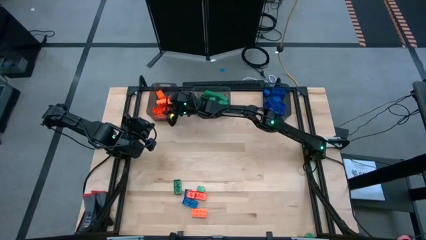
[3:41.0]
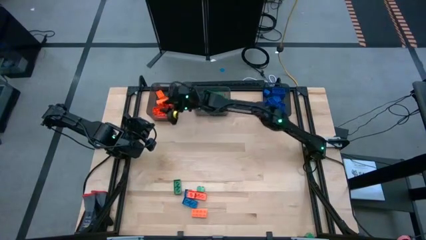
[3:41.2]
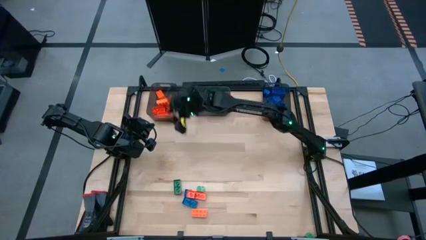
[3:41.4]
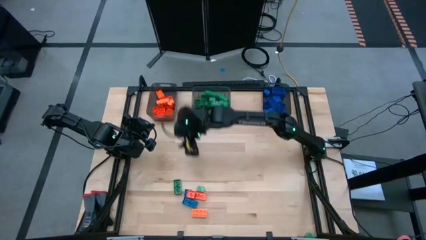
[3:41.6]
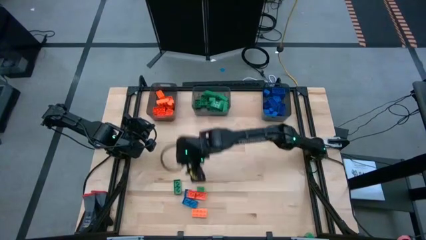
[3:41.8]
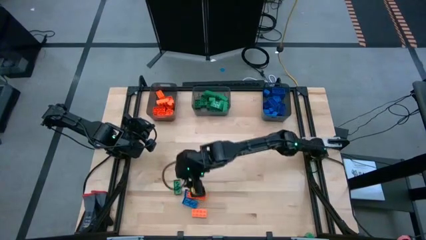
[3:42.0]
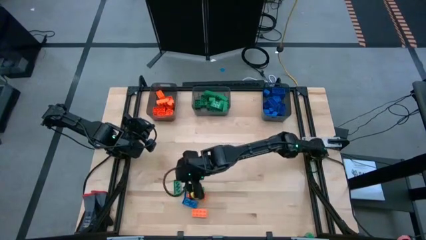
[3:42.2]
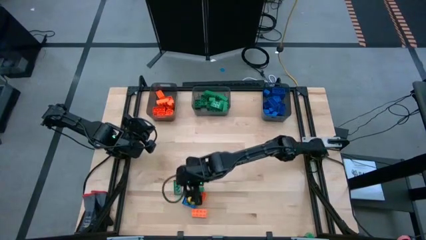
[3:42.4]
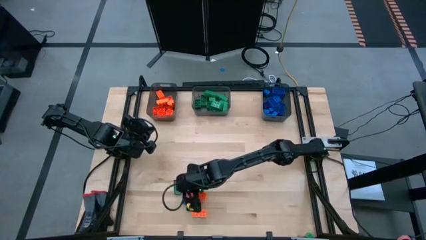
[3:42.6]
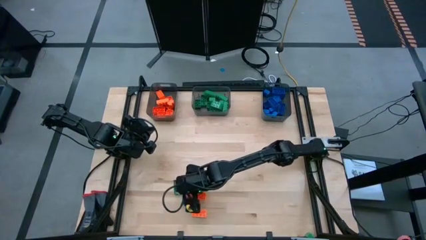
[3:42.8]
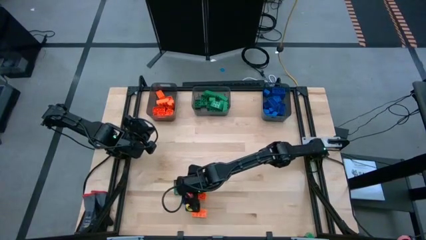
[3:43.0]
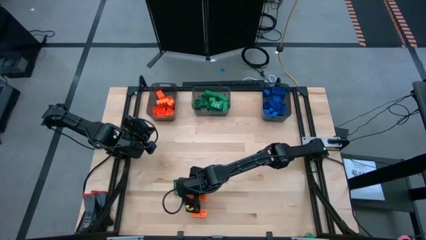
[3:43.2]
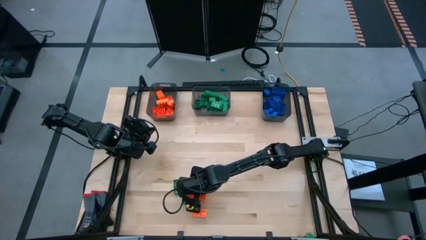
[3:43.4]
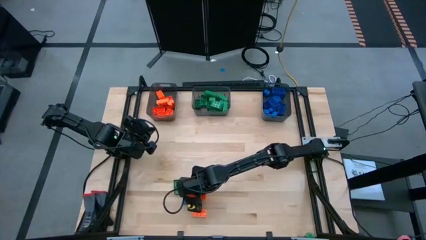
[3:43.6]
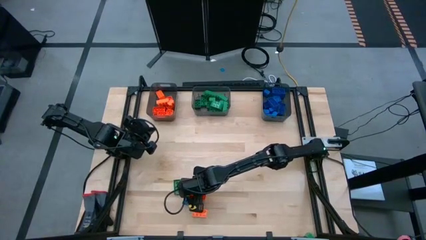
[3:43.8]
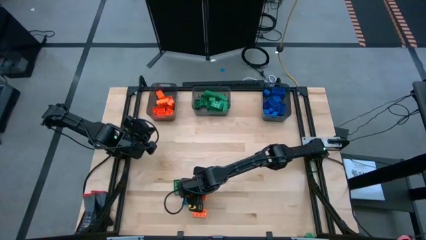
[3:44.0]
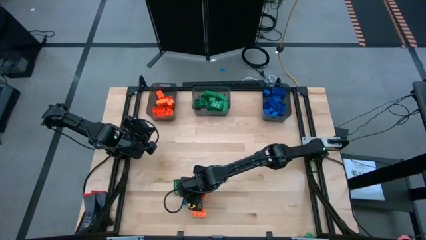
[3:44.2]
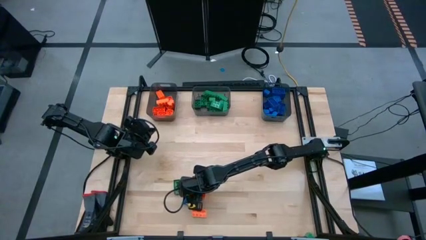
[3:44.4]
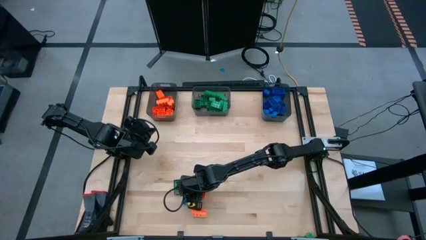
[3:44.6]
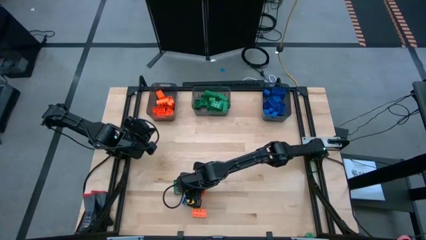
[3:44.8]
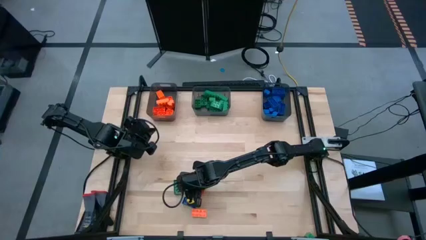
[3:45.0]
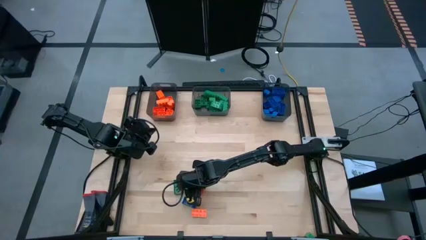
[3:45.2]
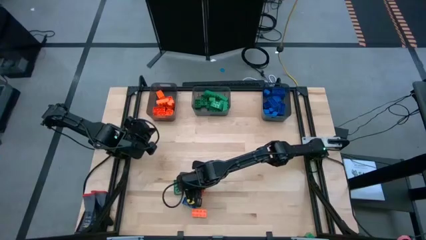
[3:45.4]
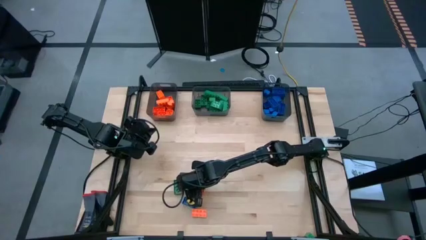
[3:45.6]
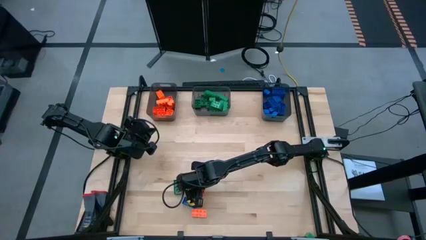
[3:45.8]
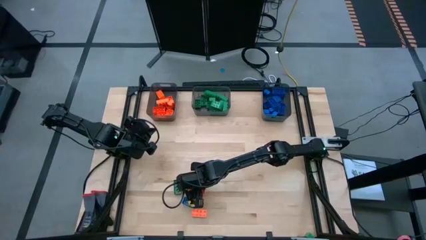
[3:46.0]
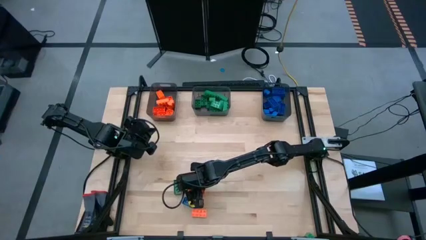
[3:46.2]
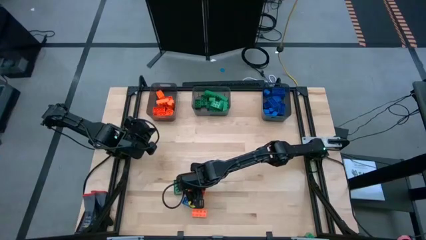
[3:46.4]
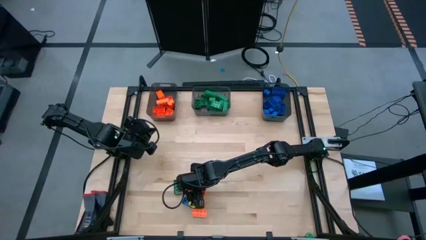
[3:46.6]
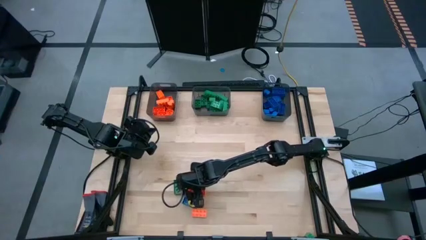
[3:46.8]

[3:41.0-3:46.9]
Task: Sort blocks
Put the orange game piece into the left black bin

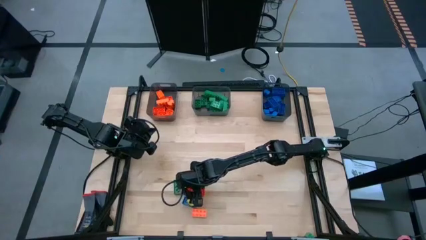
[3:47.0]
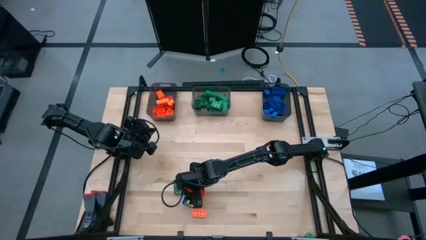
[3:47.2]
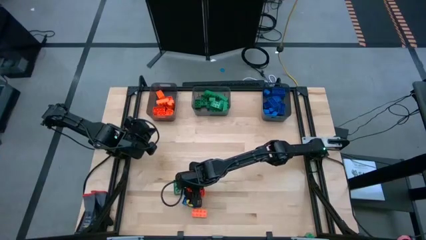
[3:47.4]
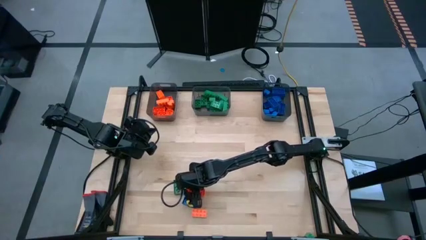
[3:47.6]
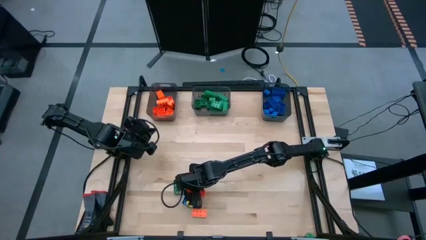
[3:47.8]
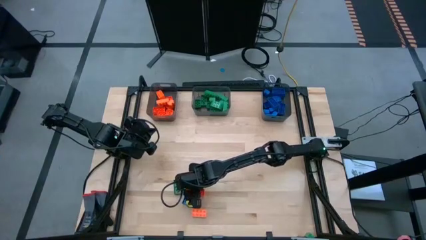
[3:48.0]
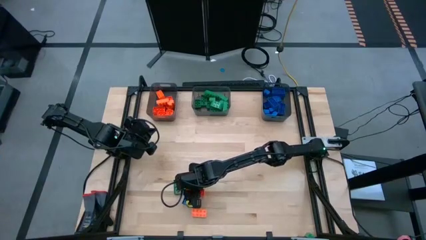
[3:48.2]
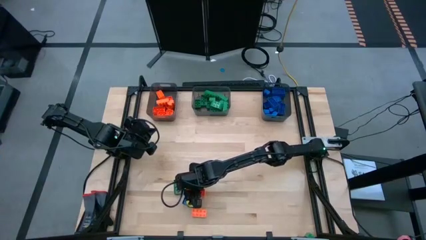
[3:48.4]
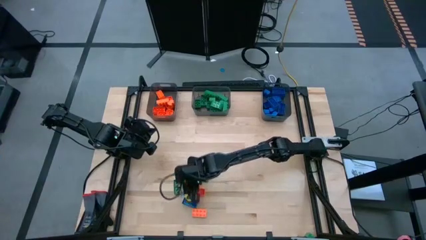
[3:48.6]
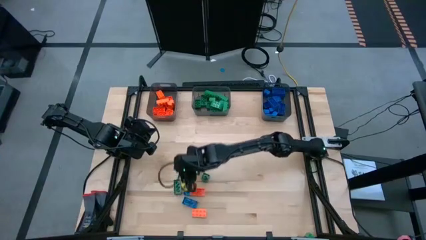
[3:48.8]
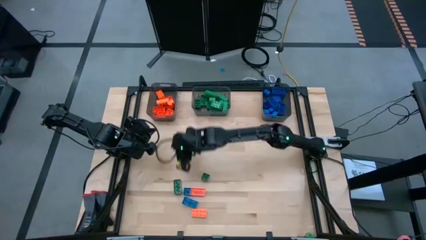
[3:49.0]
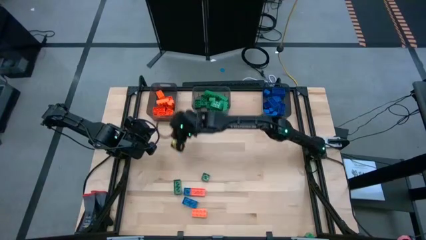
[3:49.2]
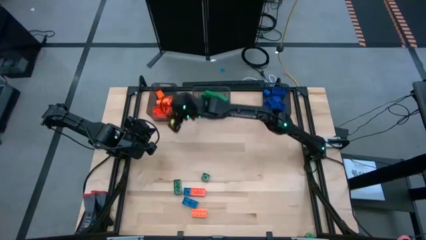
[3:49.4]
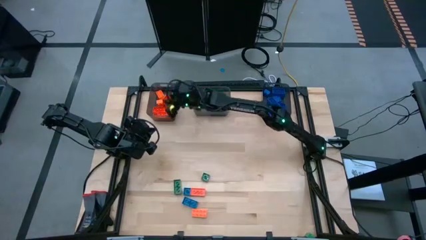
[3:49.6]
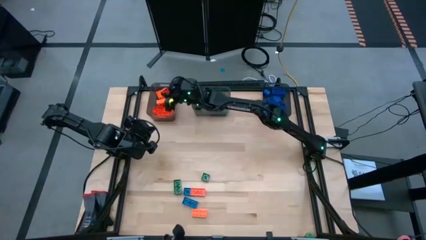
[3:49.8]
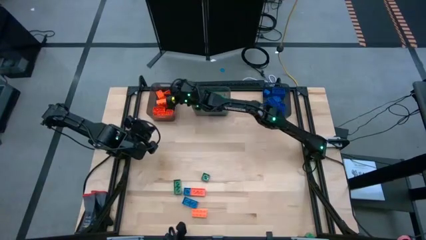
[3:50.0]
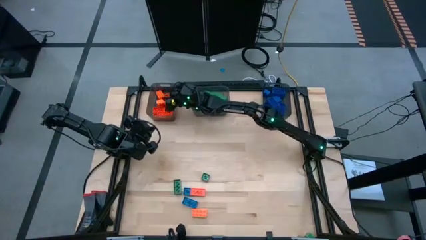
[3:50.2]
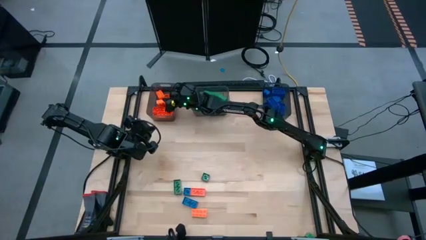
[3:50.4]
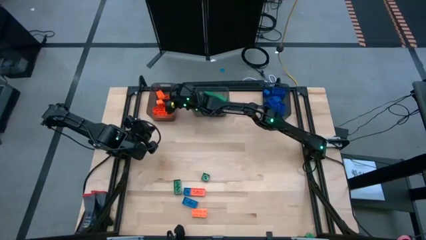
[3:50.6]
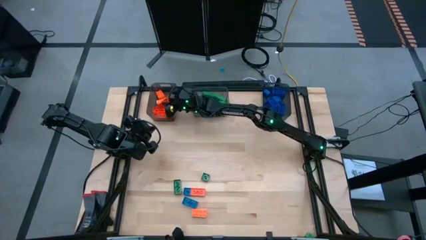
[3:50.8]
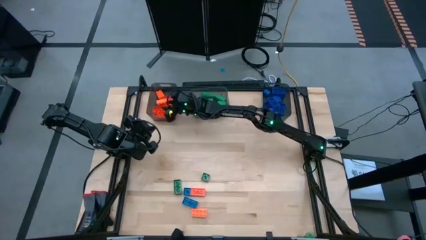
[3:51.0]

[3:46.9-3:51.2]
Put the orange game piece into the left black bin

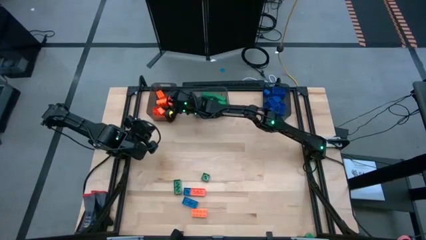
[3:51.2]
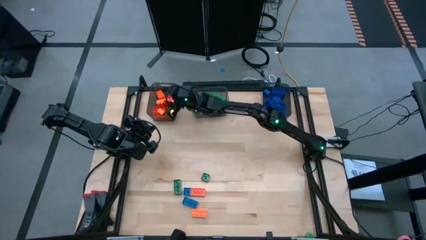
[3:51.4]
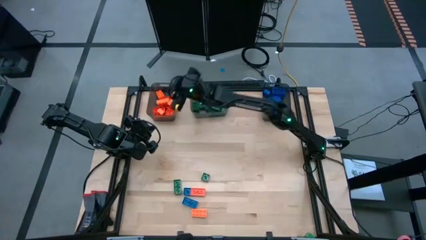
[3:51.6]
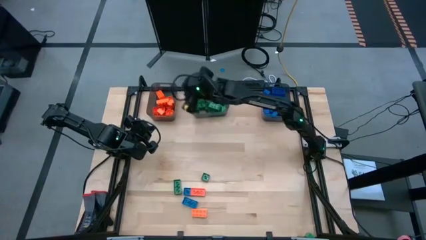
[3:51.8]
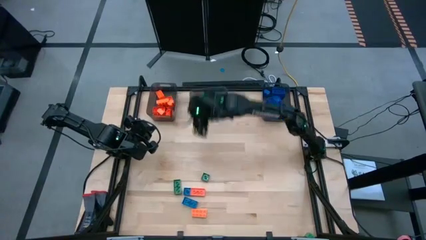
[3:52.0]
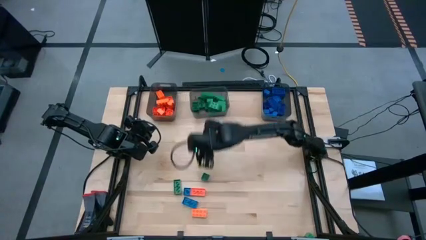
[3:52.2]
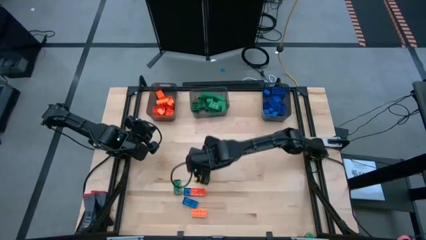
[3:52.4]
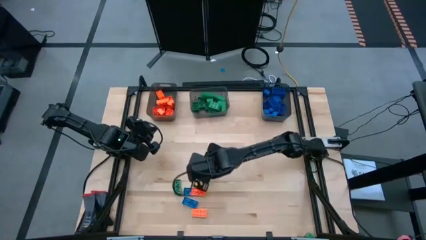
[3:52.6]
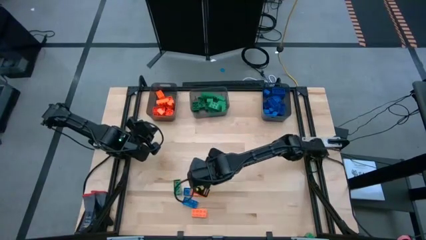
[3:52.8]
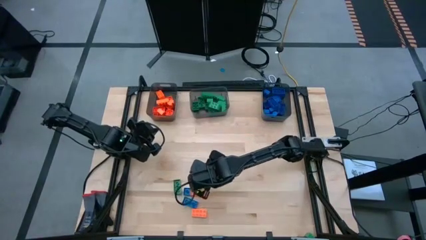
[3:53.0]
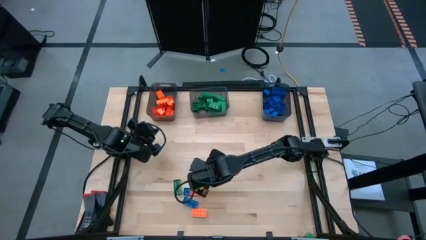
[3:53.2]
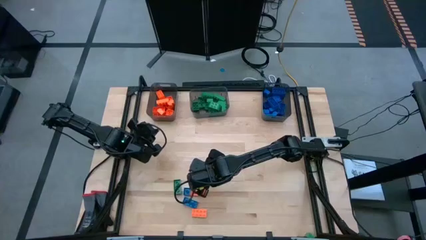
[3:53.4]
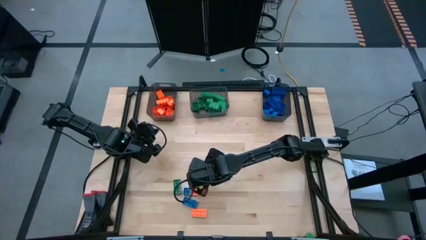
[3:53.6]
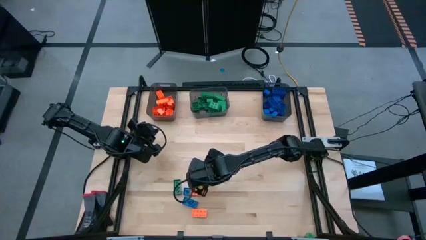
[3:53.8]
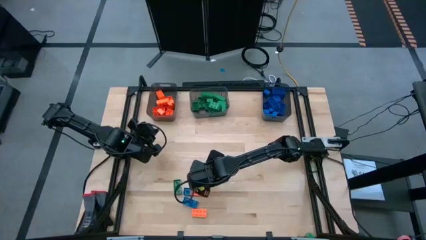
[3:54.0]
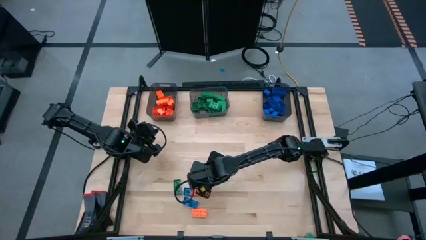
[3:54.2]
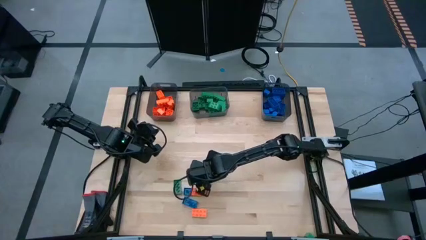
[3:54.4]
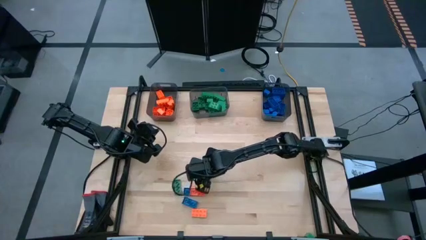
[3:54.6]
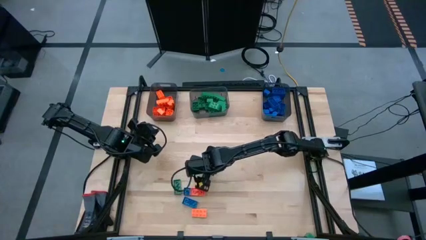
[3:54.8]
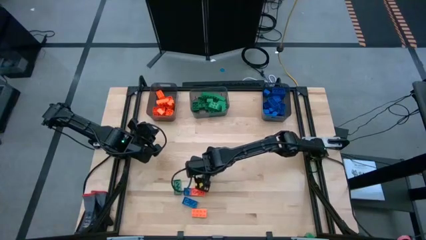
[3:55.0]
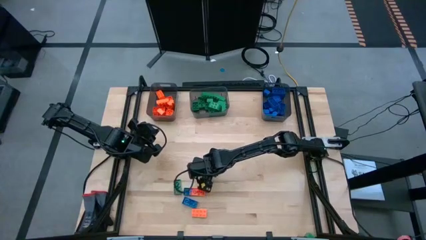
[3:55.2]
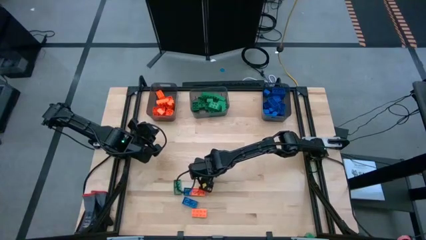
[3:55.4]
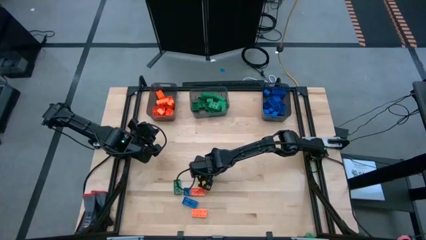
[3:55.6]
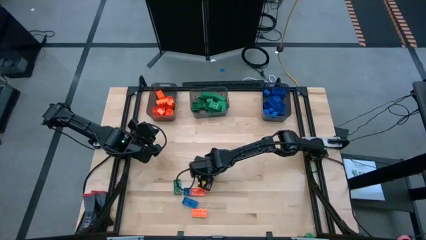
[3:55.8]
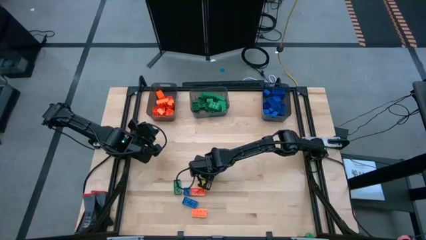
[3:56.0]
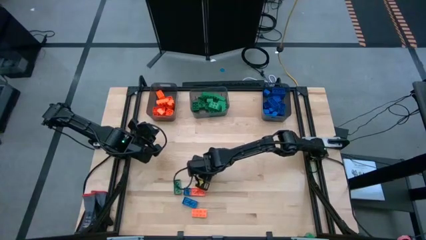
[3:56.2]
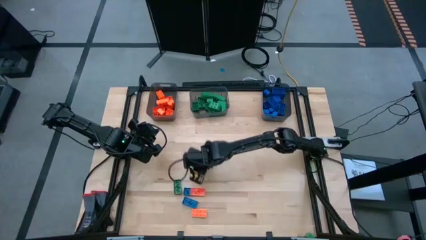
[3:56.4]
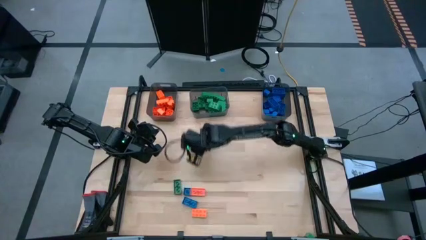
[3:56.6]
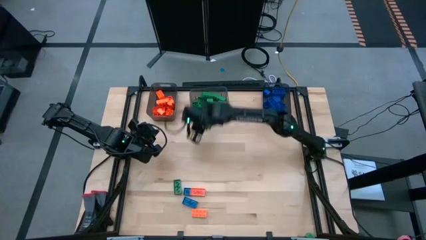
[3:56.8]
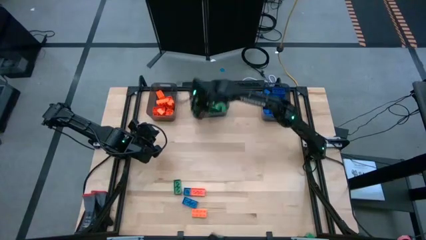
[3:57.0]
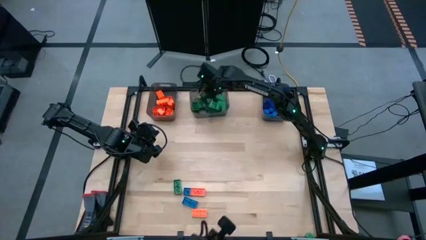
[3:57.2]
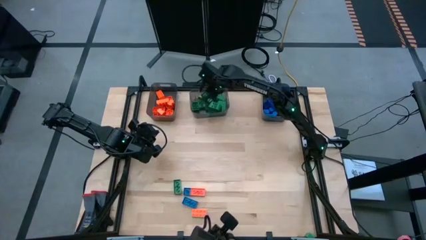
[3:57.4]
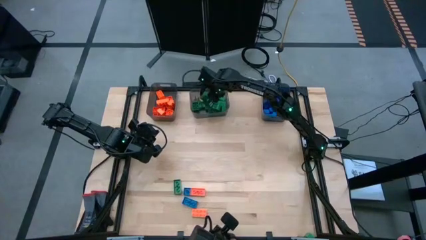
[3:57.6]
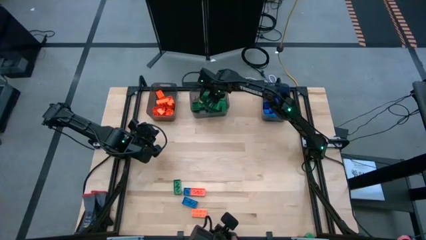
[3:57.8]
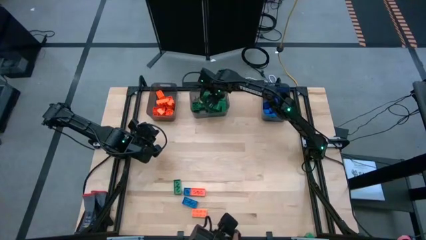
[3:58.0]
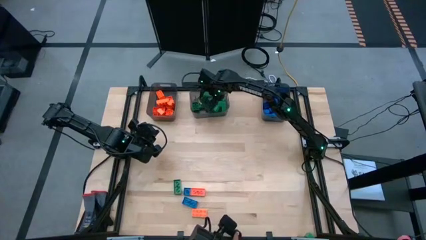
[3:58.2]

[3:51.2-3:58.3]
Put the green piece into the middle black bin
